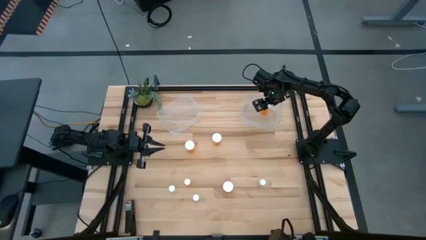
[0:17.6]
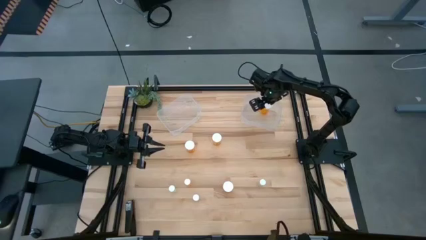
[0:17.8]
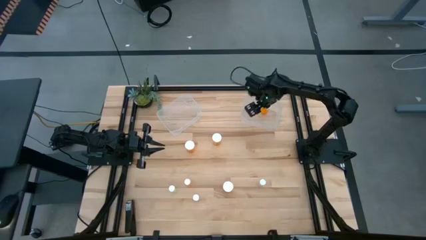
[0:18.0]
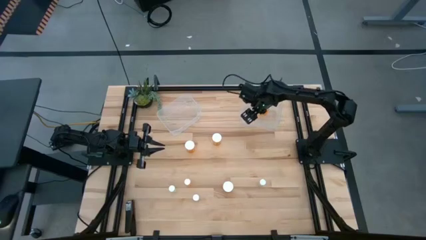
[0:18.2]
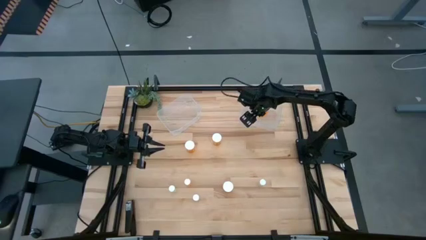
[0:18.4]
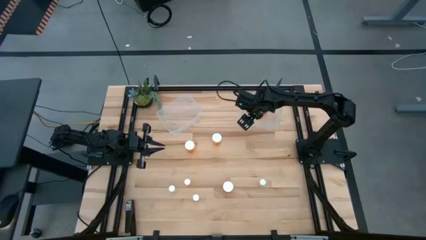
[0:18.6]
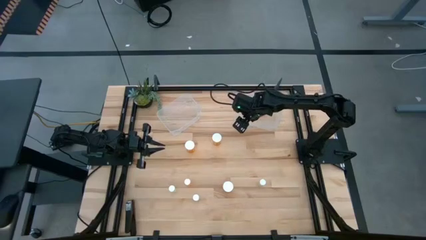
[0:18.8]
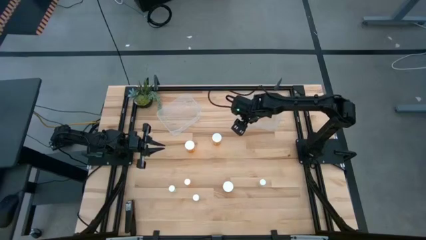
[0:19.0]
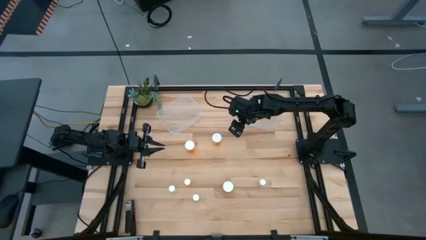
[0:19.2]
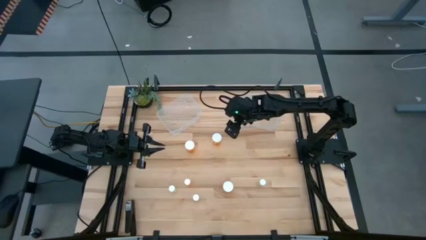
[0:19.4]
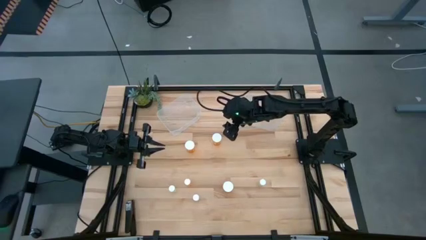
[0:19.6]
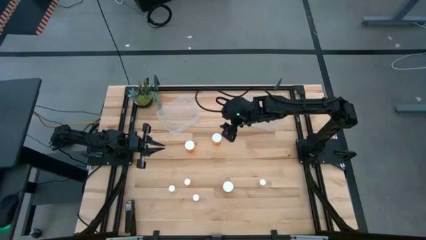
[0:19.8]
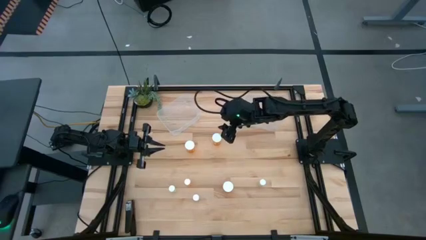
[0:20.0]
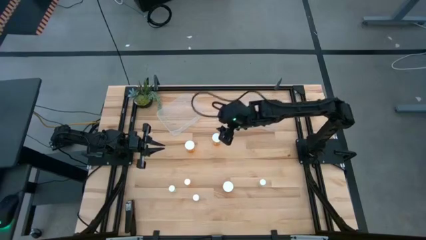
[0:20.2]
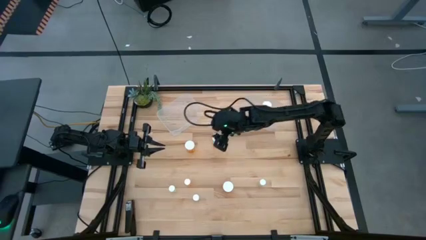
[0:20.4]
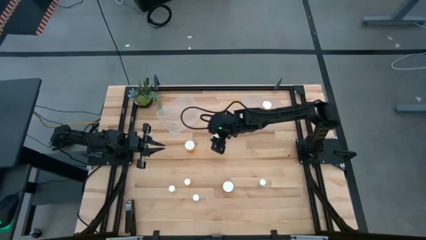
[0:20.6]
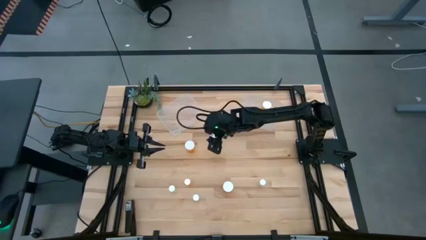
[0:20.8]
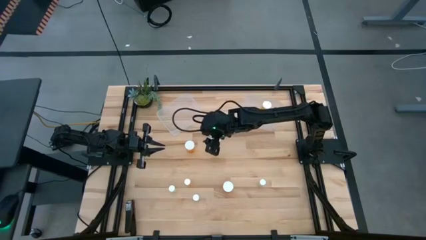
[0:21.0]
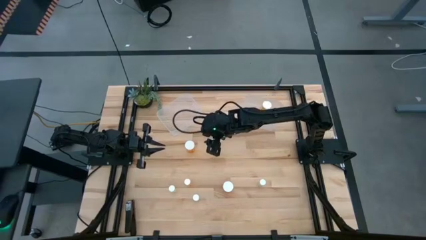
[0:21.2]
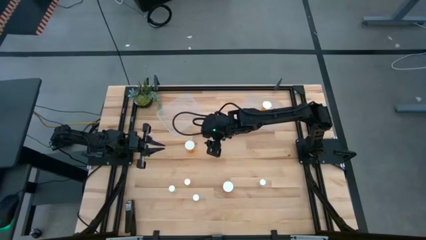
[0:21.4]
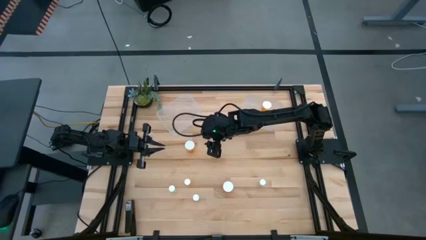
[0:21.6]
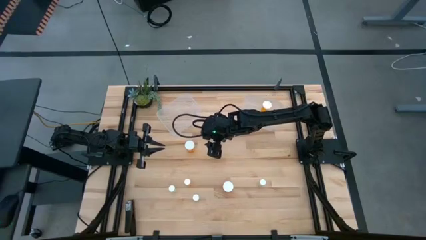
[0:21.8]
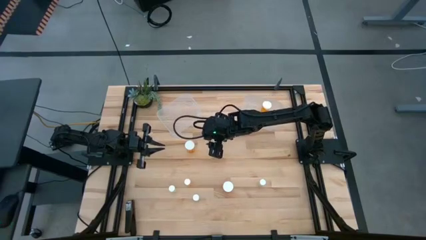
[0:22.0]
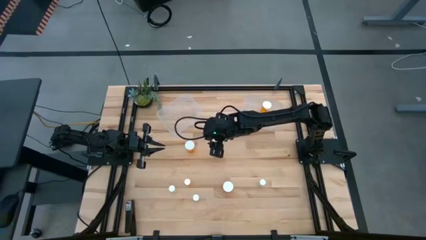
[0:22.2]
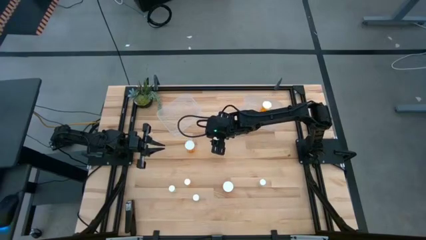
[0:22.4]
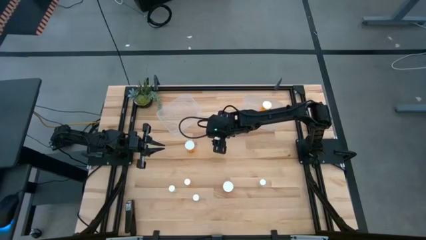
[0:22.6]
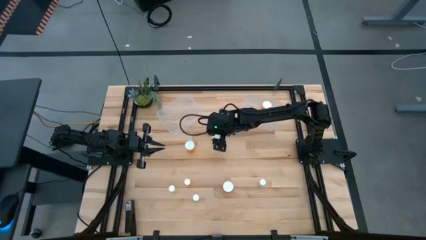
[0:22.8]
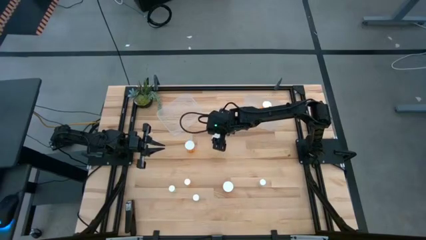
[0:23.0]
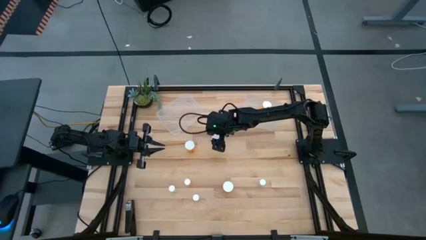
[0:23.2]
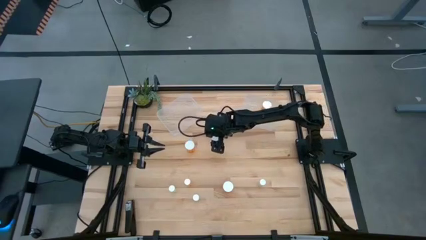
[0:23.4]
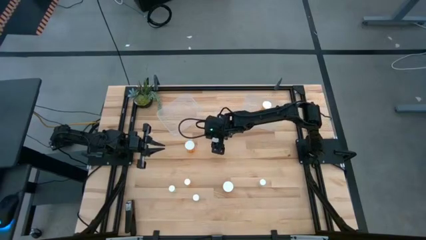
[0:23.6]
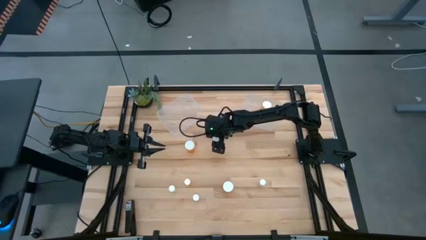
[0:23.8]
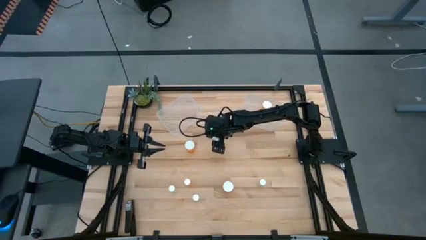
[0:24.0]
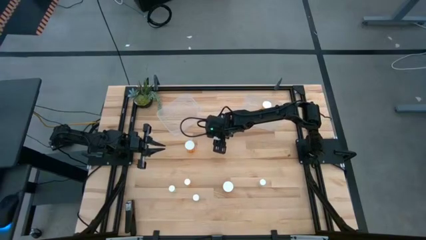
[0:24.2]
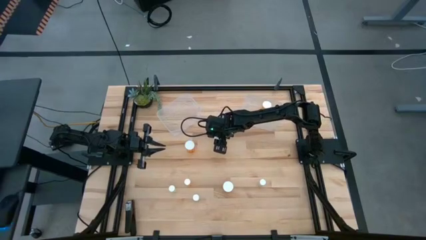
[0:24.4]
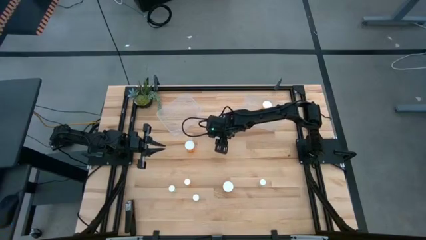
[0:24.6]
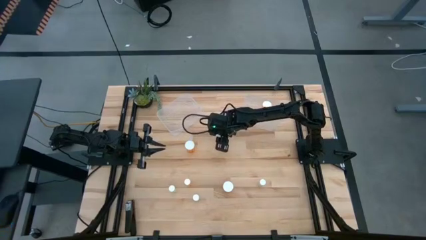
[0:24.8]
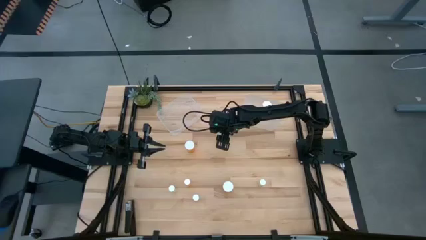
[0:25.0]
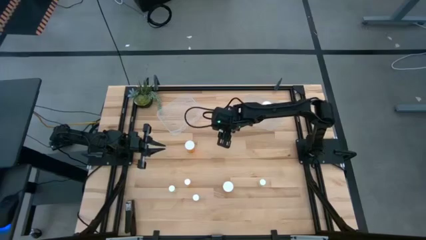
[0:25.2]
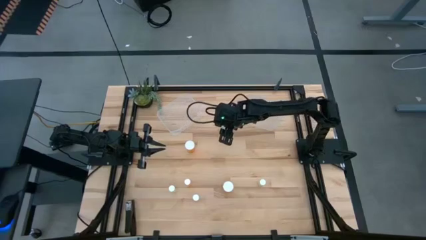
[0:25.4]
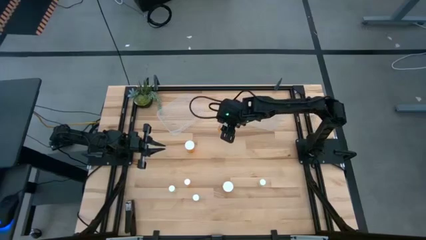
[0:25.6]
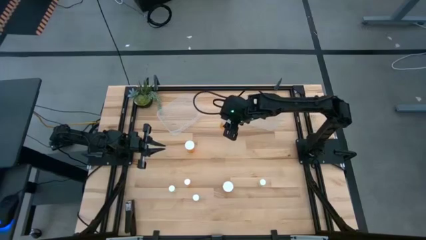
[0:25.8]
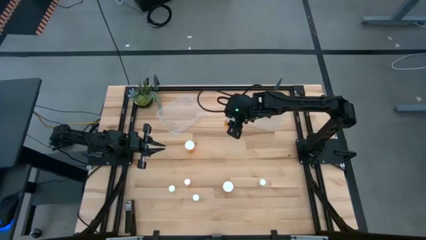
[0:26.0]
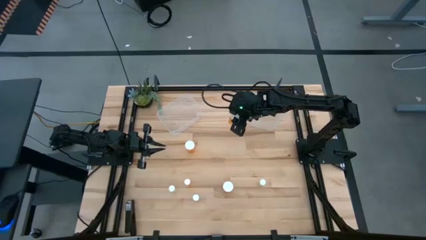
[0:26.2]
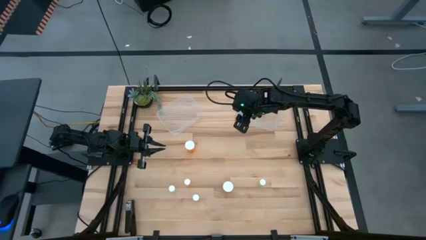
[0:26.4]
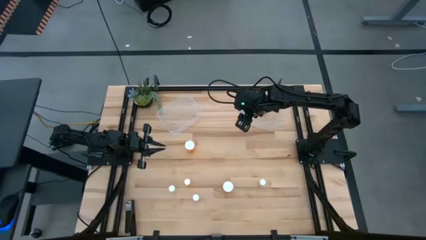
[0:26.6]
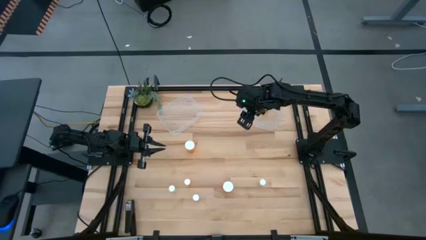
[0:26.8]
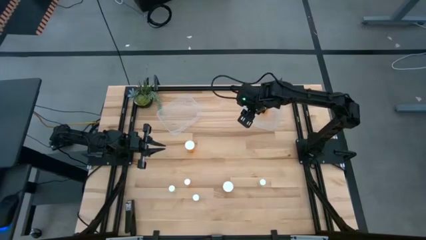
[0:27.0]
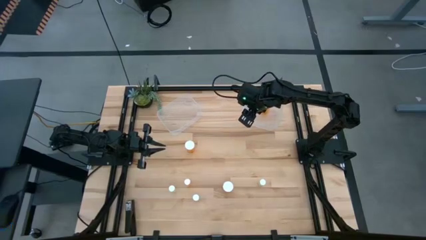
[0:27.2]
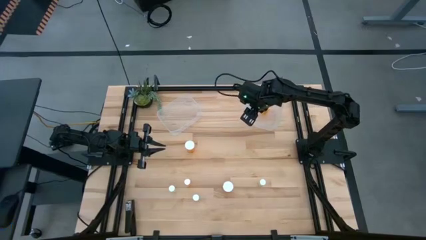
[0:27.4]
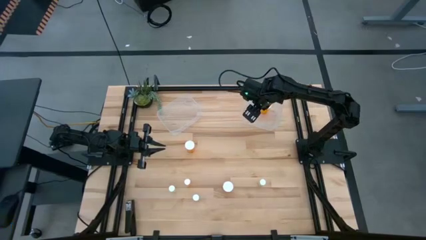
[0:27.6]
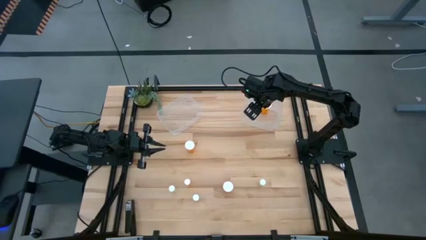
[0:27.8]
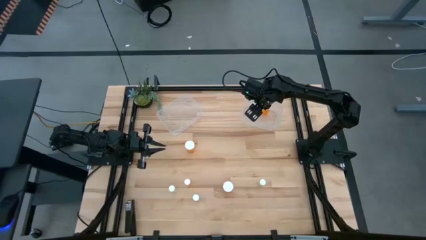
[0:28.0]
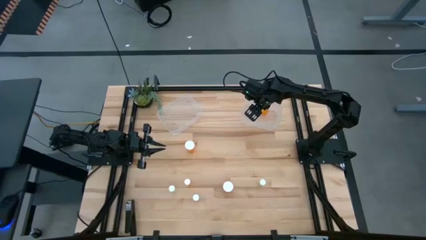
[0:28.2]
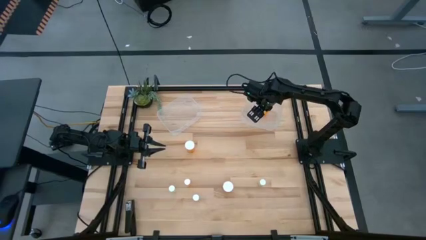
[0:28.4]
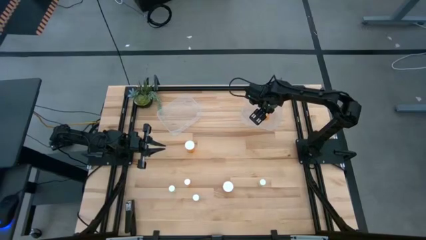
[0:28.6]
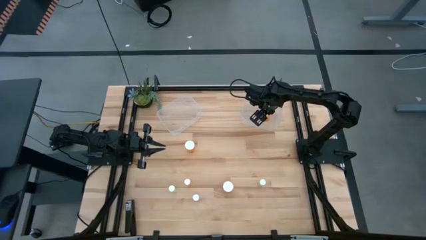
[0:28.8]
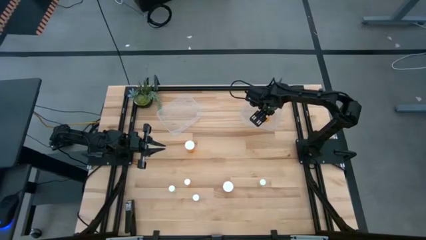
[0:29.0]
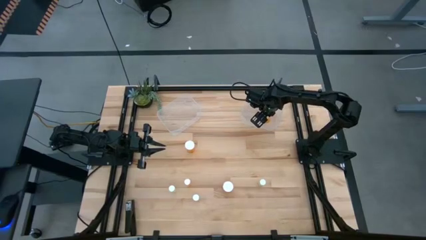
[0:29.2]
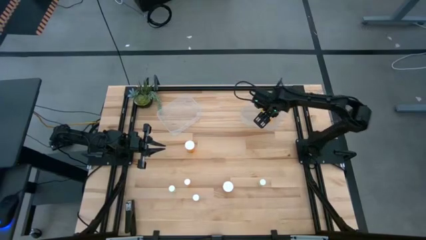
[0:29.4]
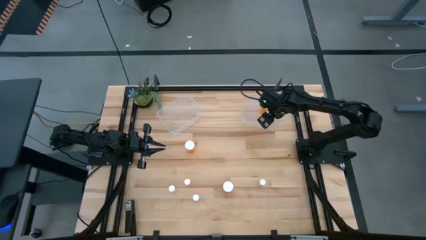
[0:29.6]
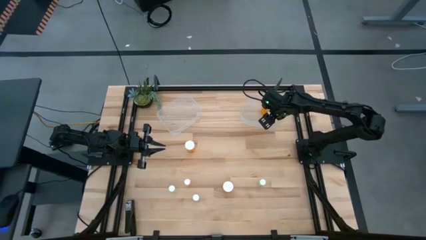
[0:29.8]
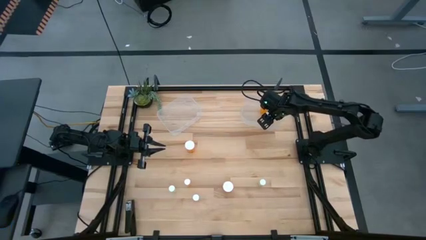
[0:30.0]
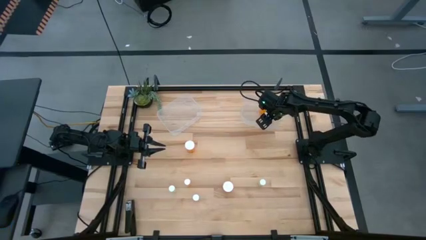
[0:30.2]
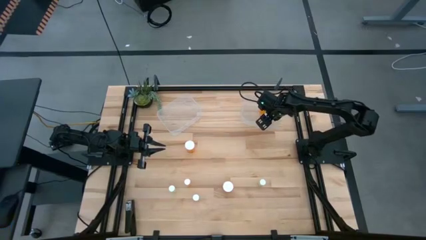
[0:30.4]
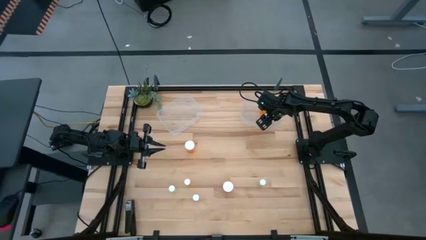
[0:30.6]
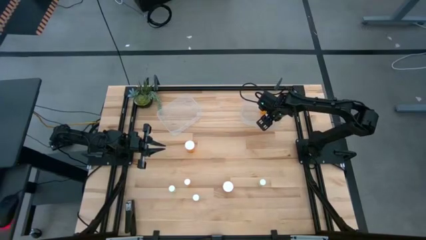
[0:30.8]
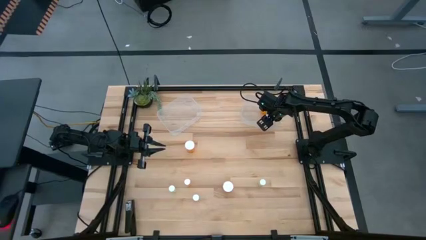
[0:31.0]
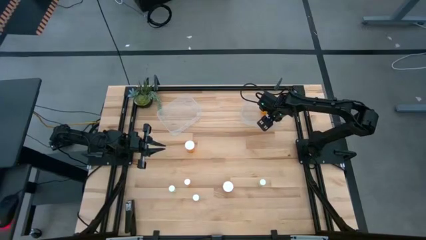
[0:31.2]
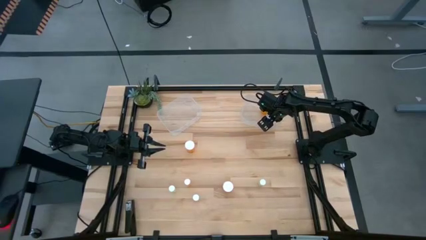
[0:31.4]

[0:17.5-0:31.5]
Task: Pick and place medicine bottles into bin by pill shape (circle, oval)
Put the big orange pill bottle into the right transparent bin
